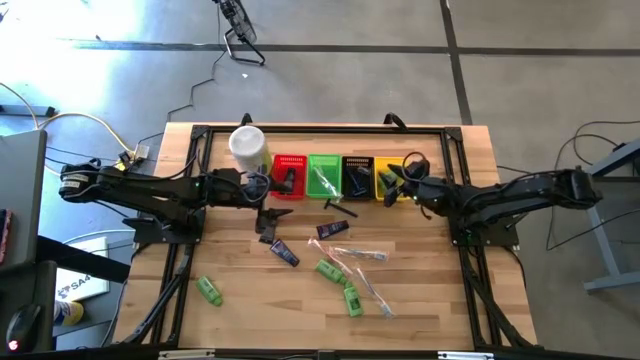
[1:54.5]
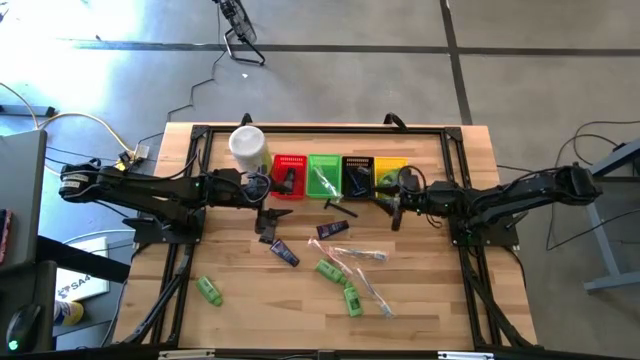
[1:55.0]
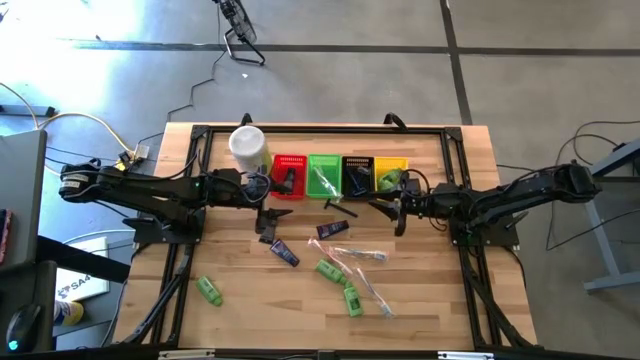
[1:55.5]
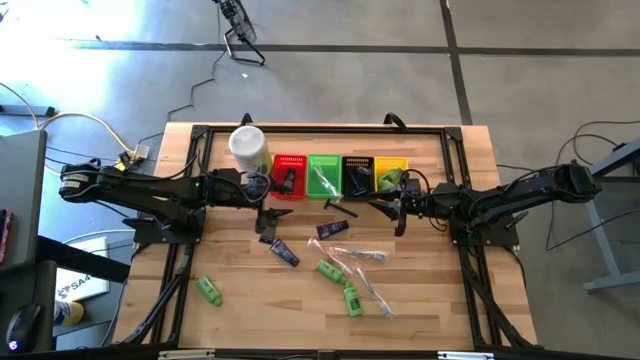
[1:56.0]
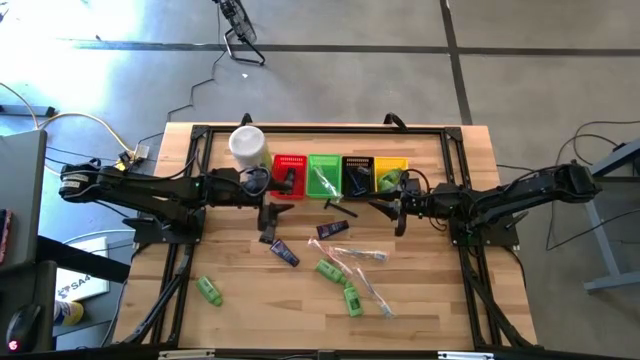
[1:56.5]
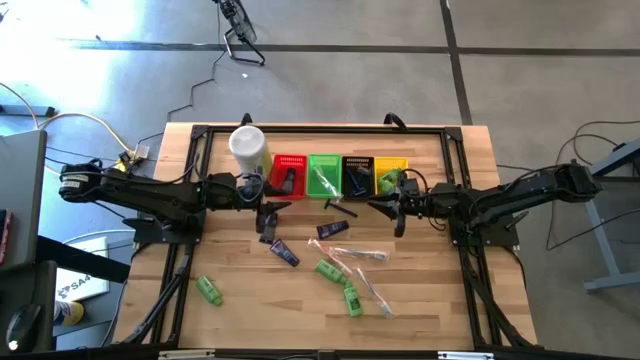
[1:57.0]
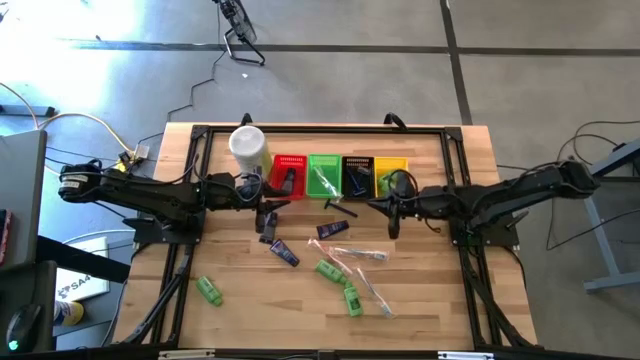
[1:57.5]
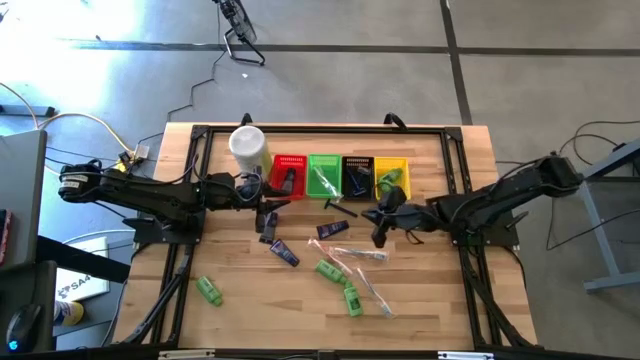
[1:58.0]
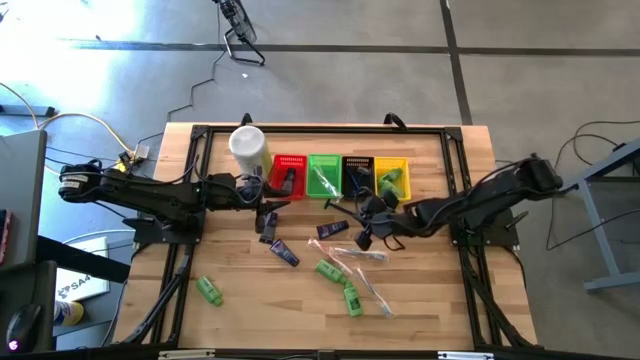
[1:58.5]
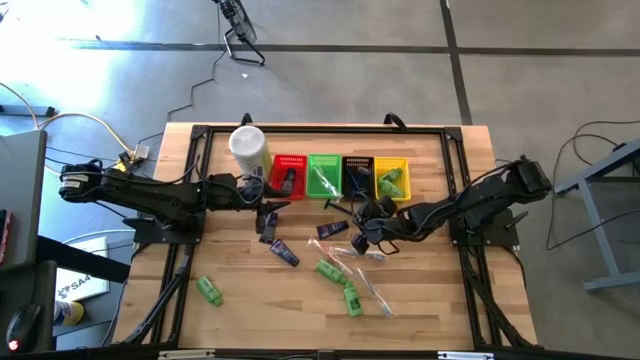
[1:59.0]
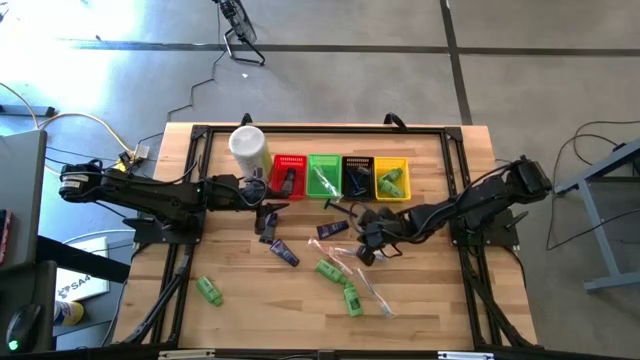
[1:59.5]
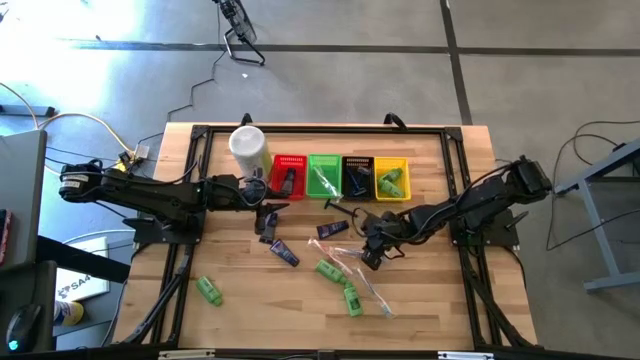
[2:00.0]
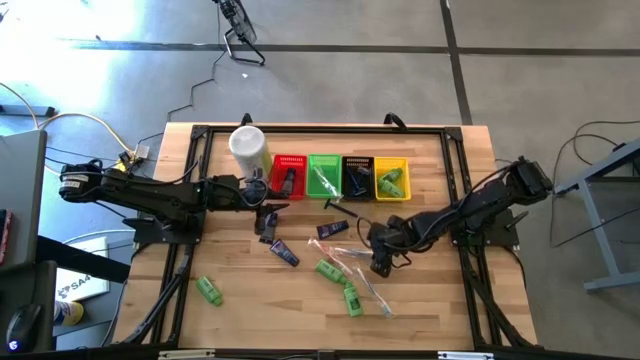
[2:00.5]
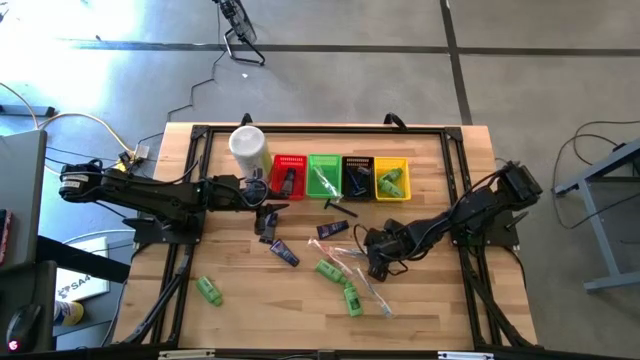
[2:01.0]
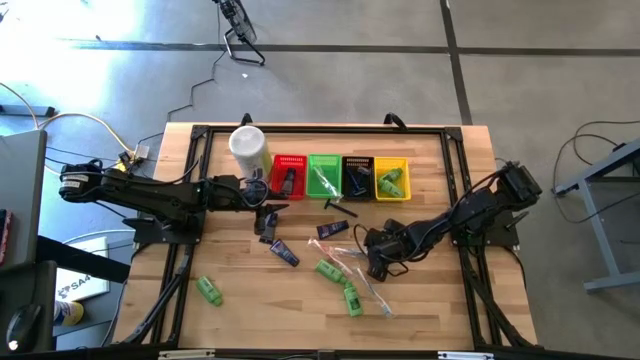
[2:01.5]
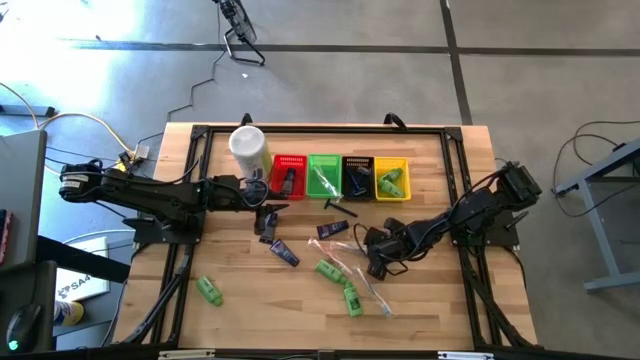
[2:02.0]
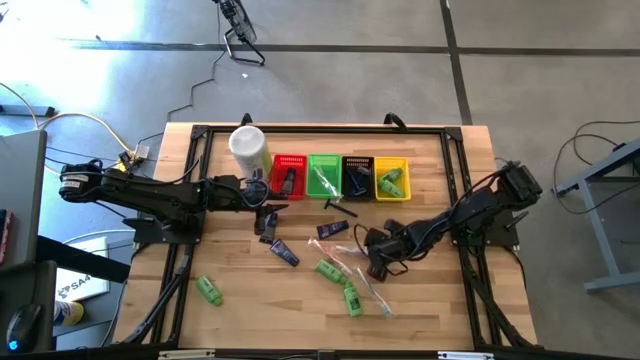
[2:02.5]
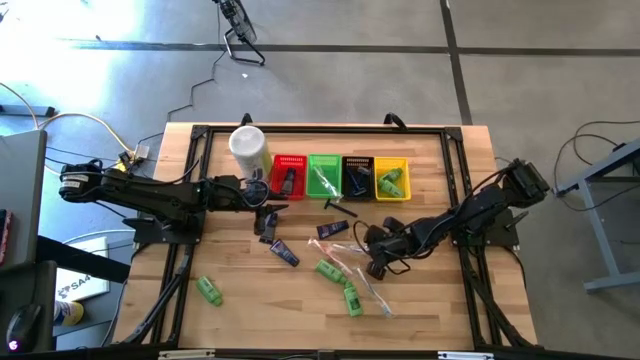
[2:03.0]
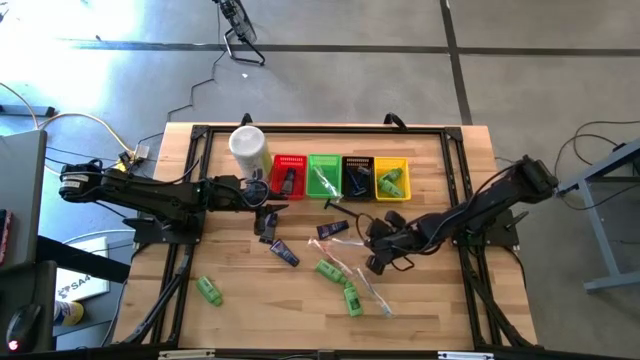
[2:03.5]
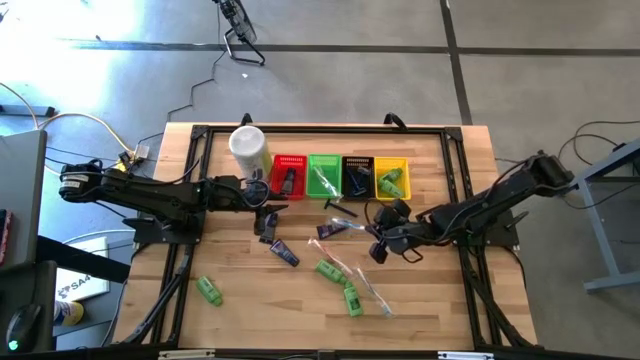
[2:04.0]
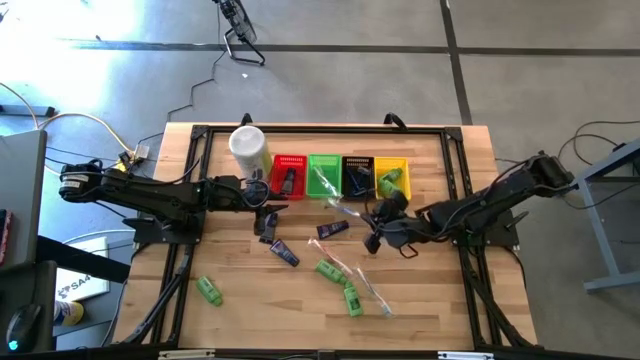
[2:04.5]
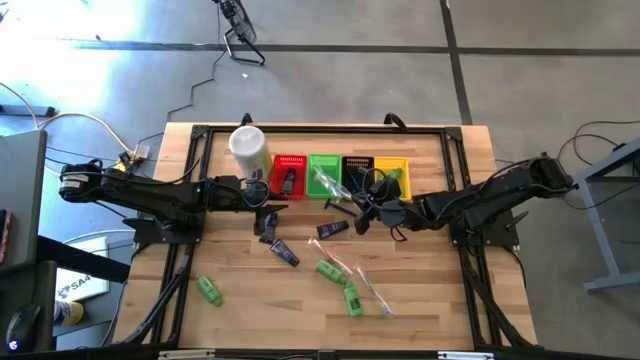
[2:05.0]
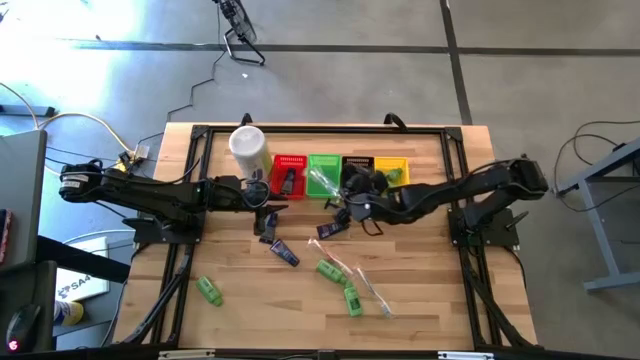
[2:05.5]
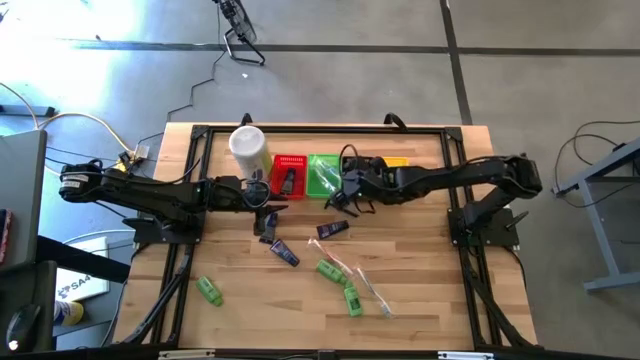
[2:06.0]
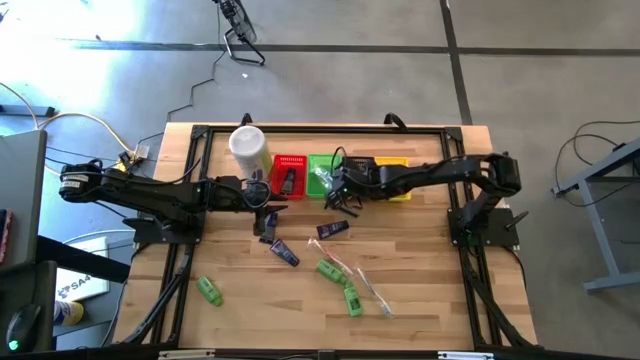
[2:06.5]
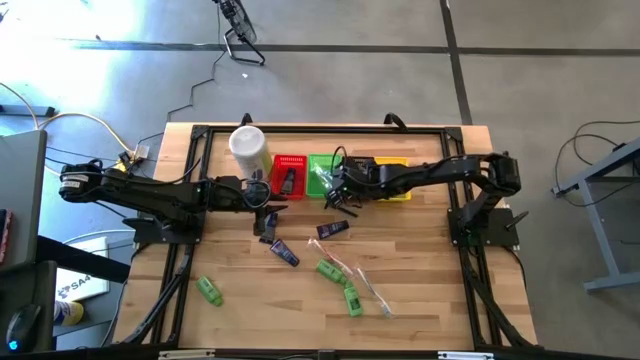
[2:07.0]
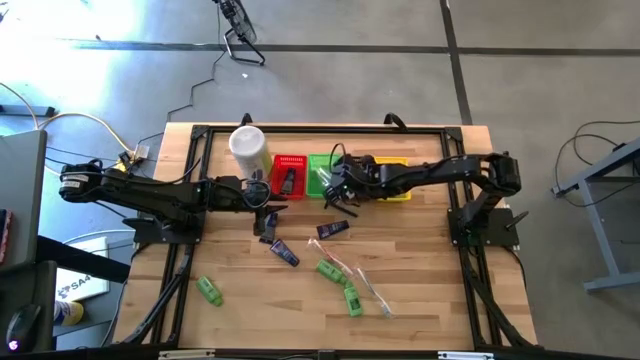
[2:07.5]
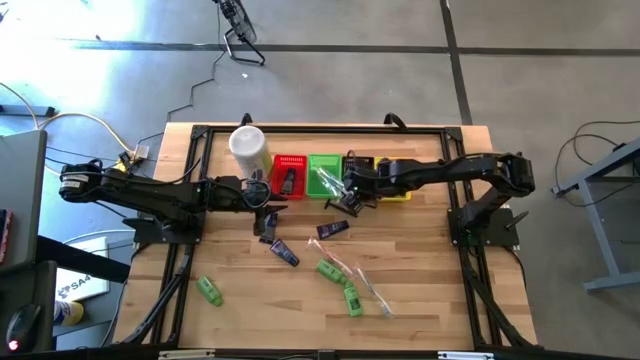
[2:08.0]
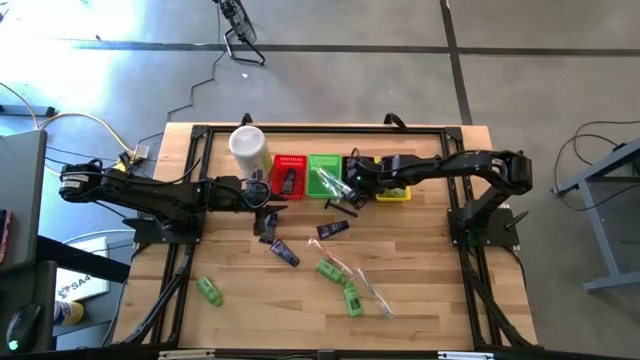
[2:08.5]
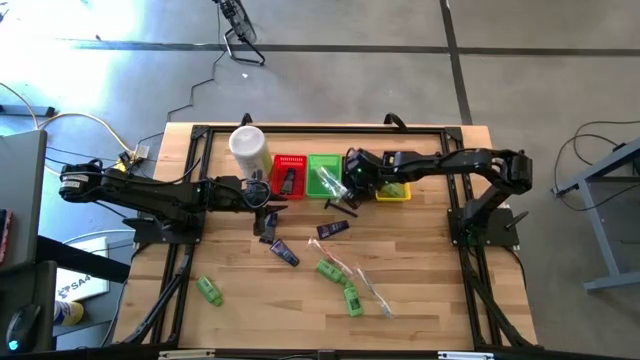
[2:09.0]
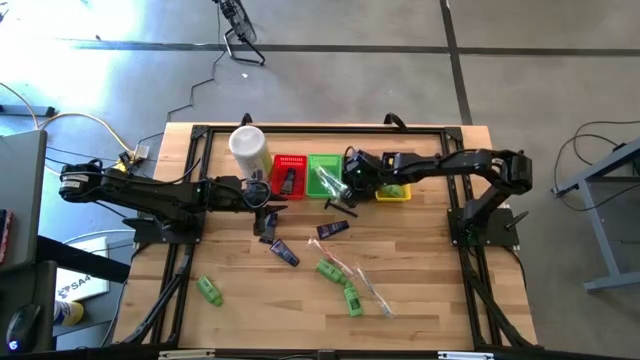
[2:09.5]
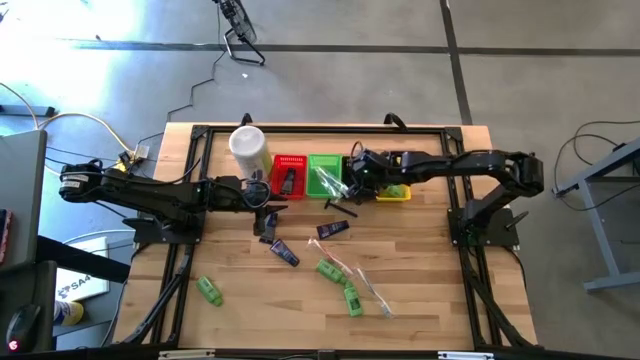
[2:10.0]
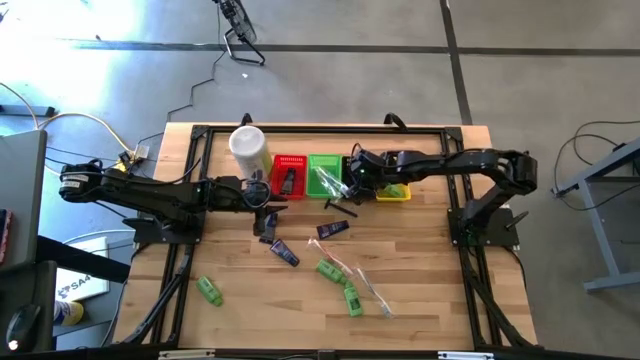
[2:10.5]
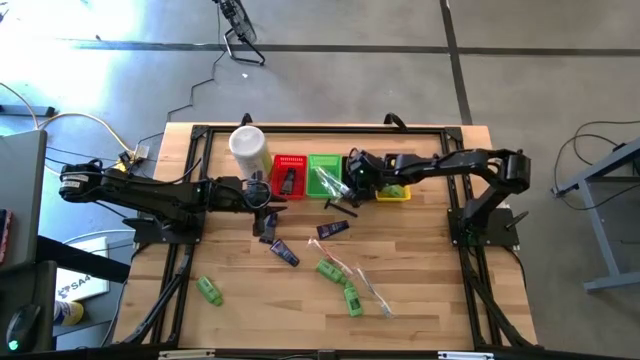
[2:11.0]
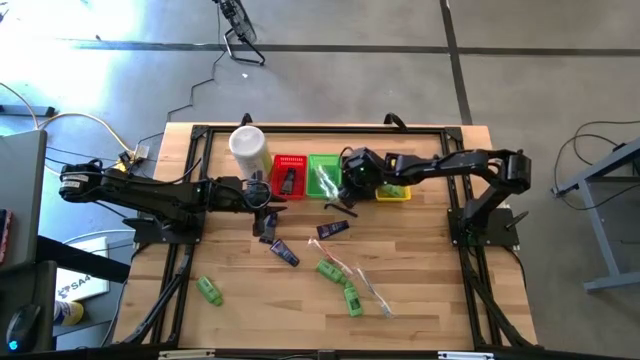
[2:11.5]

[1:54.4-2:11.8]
Task: Pick & Place Travel size toiletries
Put the blue toothbrush into the green bin

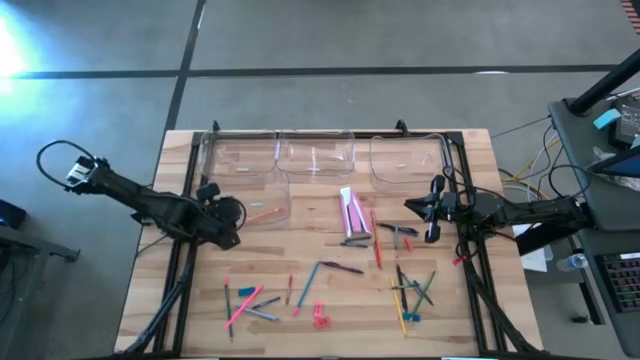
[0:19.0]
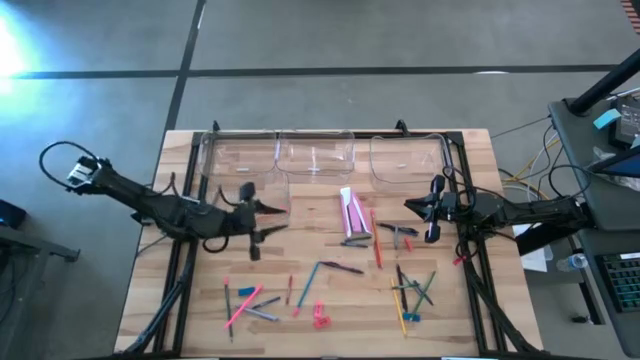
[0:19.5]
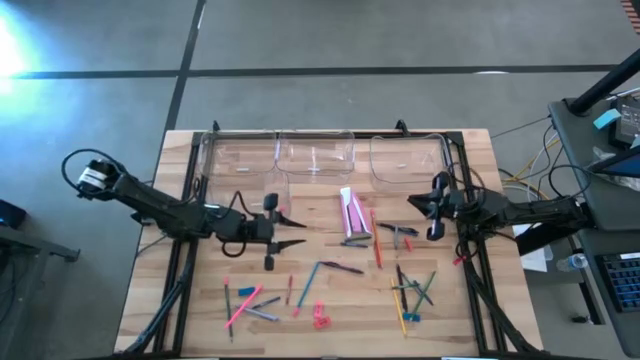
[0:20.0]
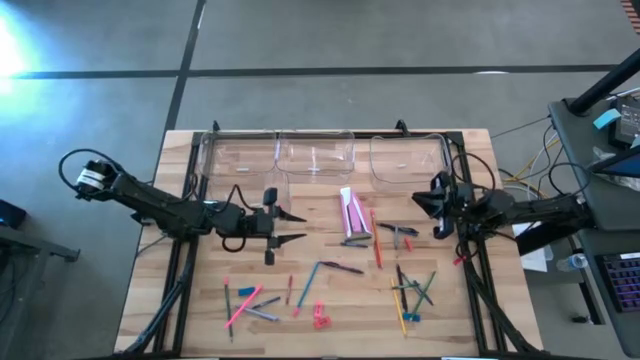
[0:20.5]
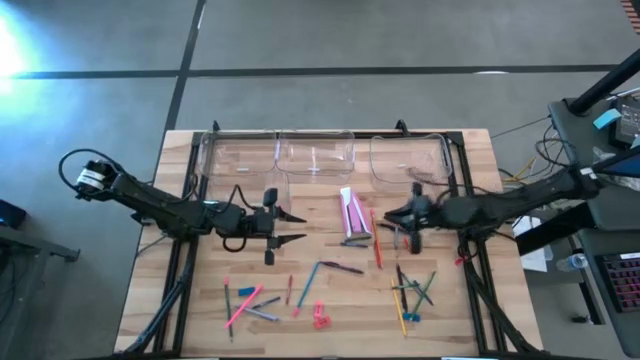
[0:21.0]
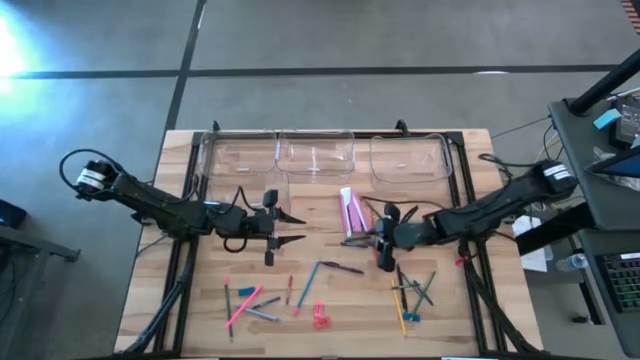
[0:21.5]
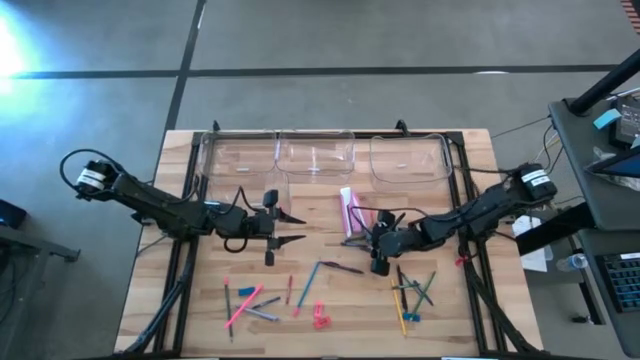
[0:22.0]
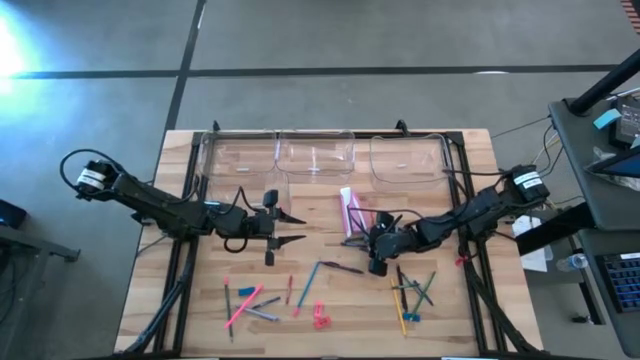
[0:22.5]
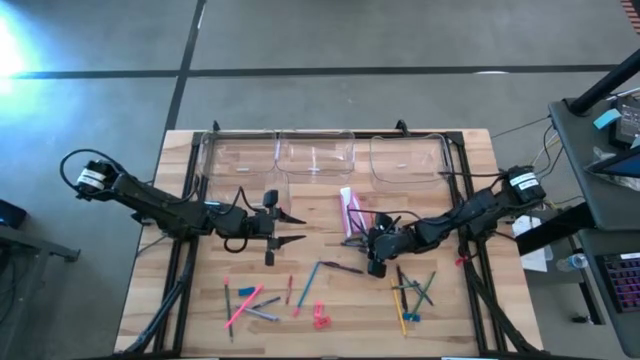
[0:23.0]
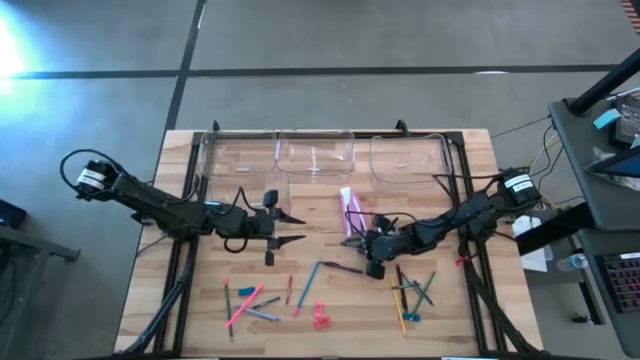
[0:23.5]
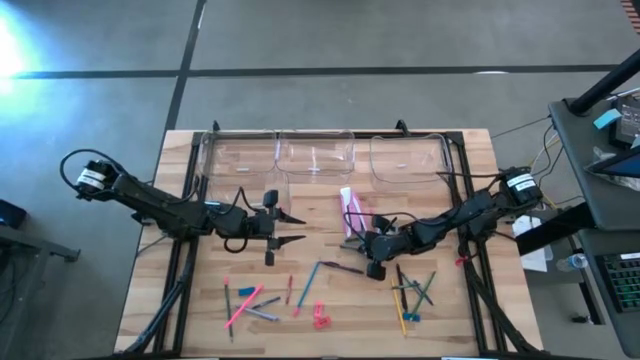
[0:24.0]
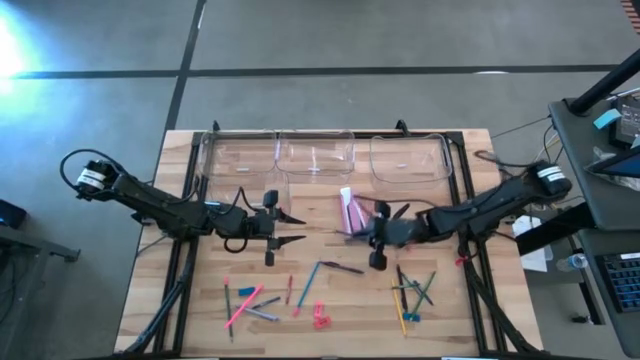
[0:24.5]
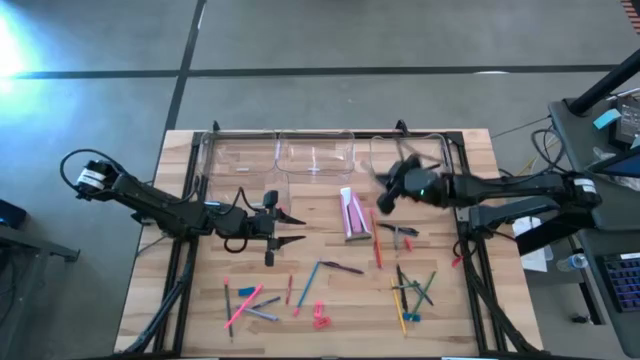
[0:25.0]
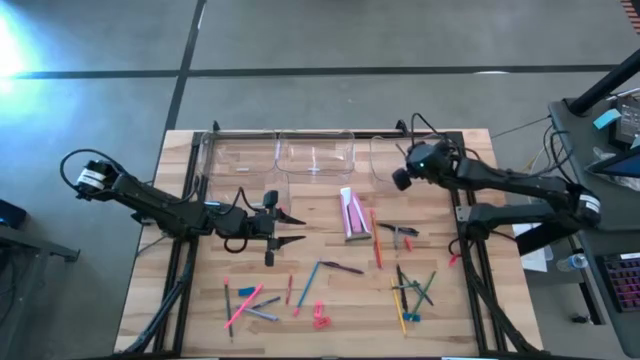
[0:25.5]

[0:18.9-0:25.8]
Task: Sort crayons/erasers/pens/pencils in bins
Put the blue crayon into the top right transparent bin
